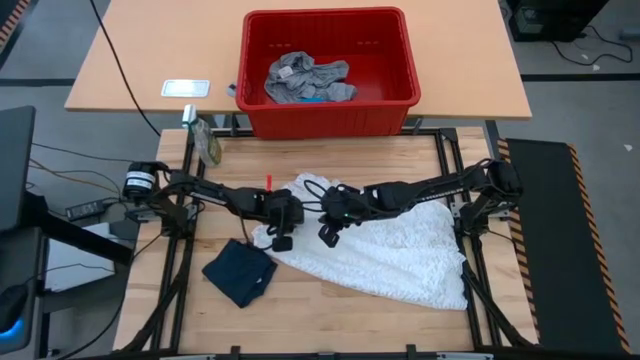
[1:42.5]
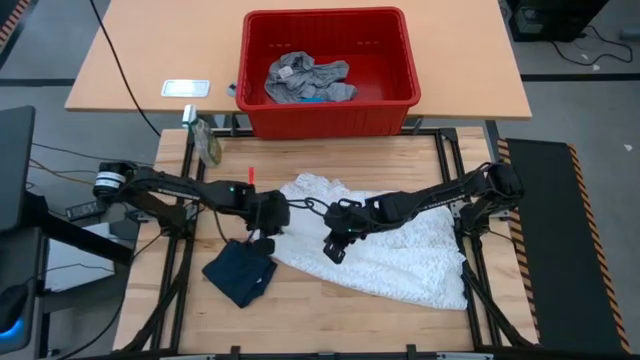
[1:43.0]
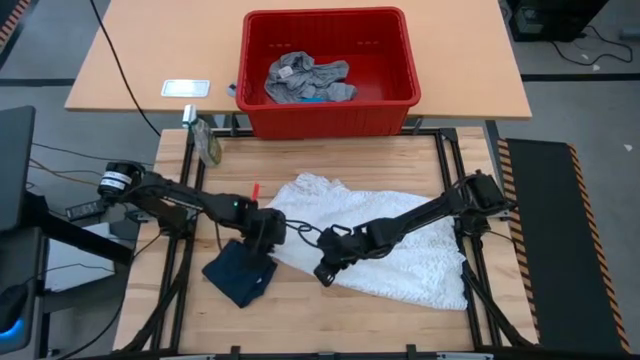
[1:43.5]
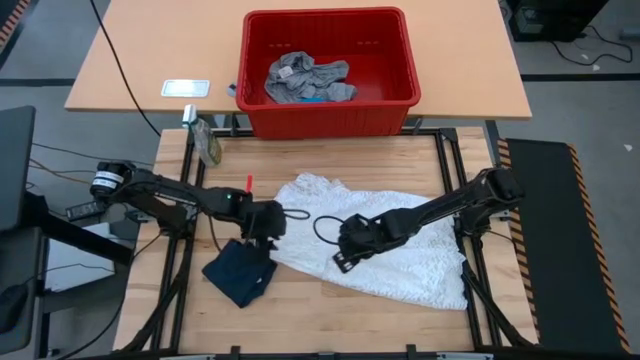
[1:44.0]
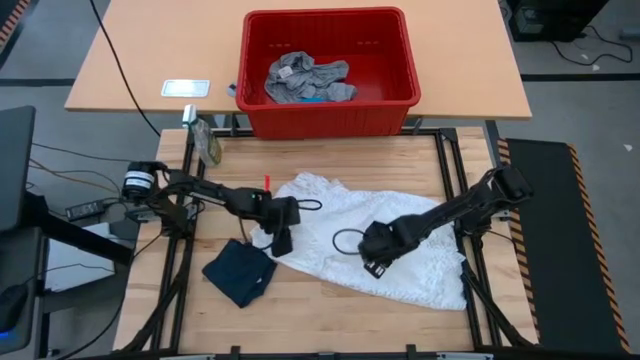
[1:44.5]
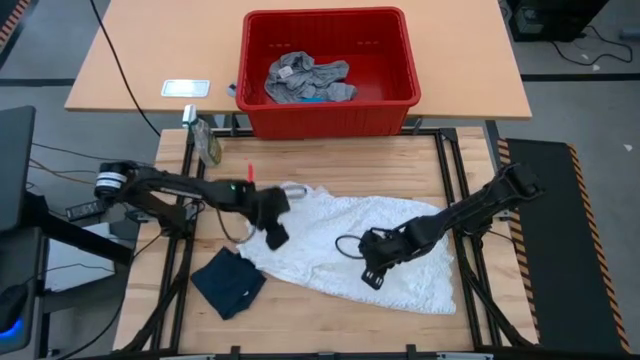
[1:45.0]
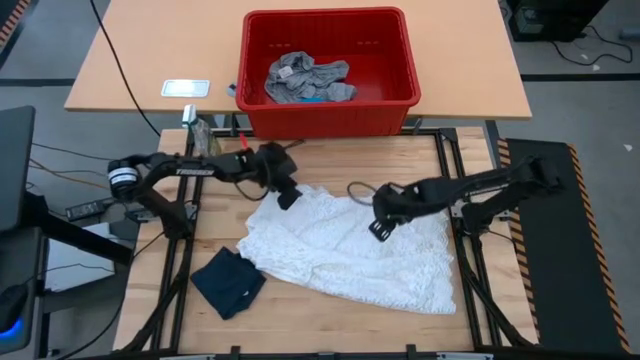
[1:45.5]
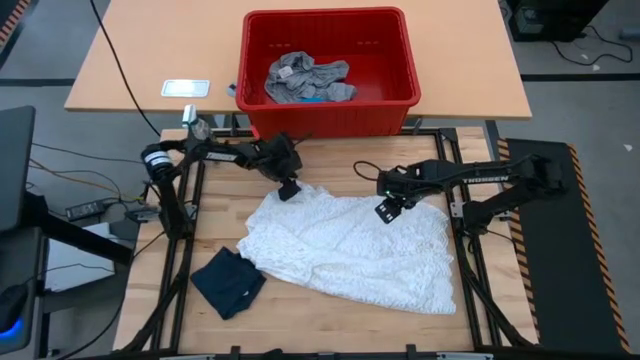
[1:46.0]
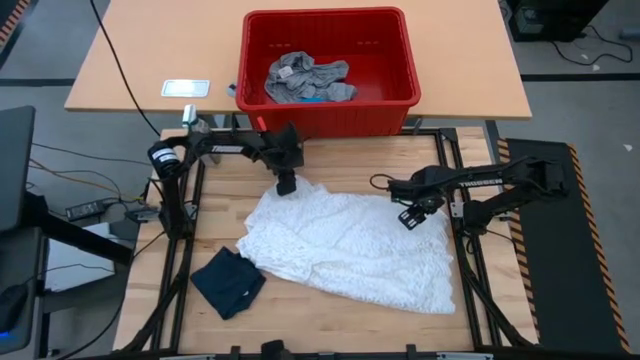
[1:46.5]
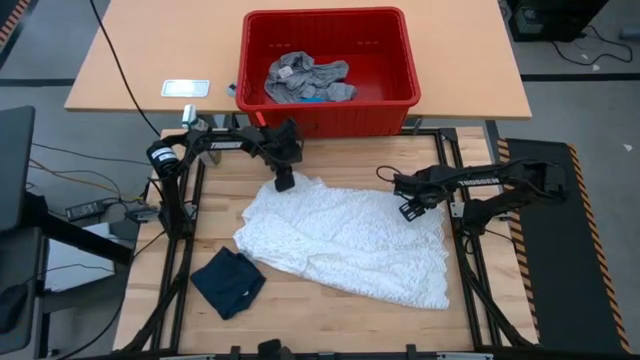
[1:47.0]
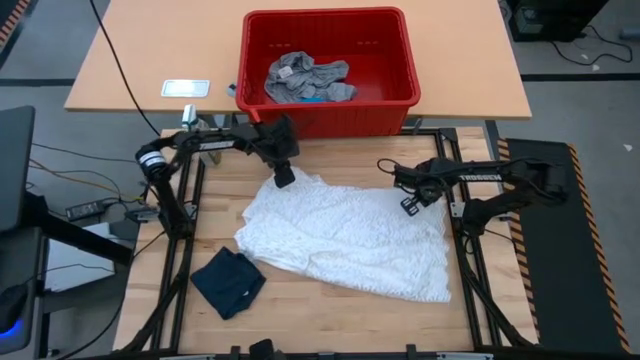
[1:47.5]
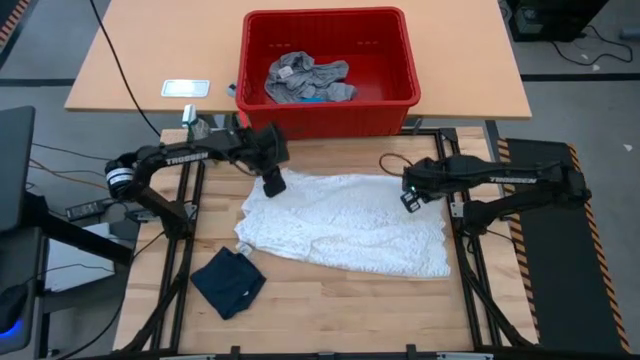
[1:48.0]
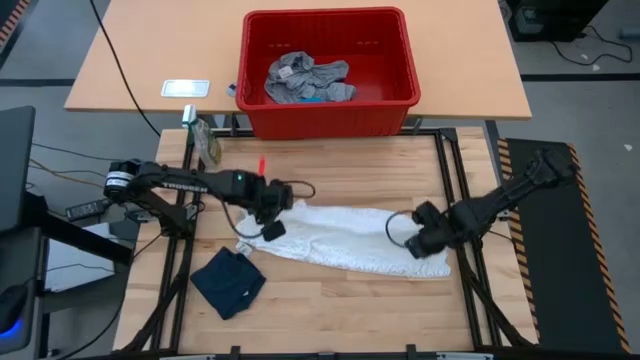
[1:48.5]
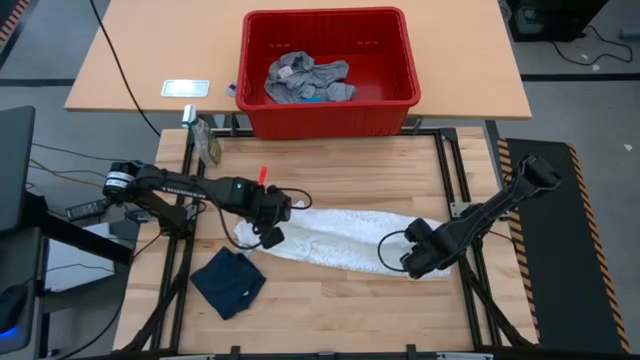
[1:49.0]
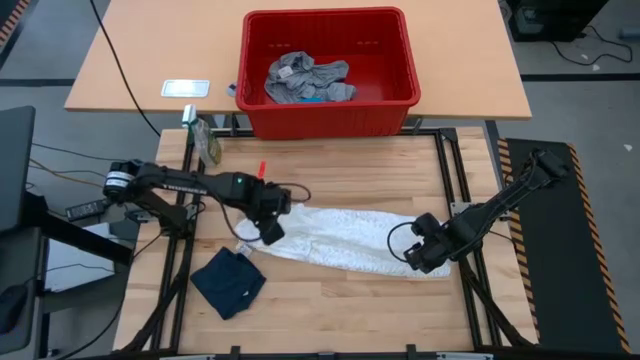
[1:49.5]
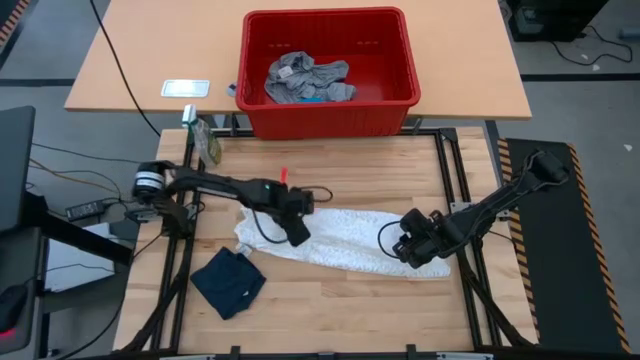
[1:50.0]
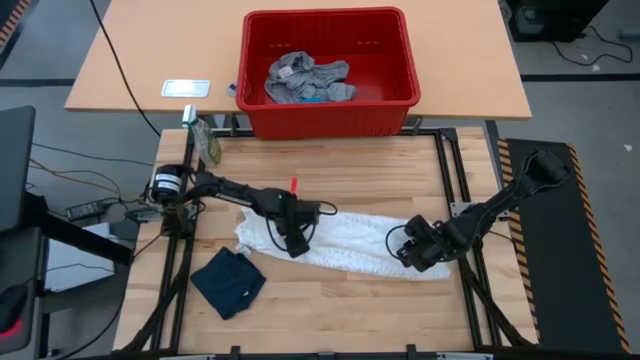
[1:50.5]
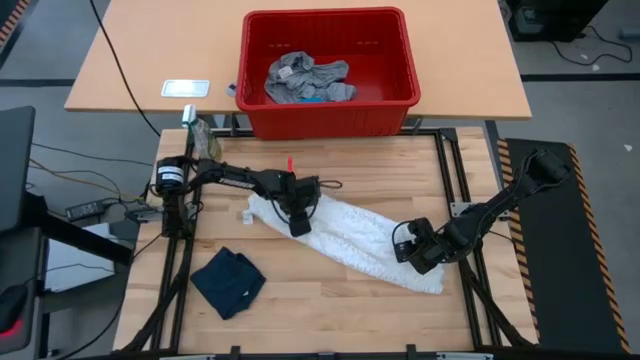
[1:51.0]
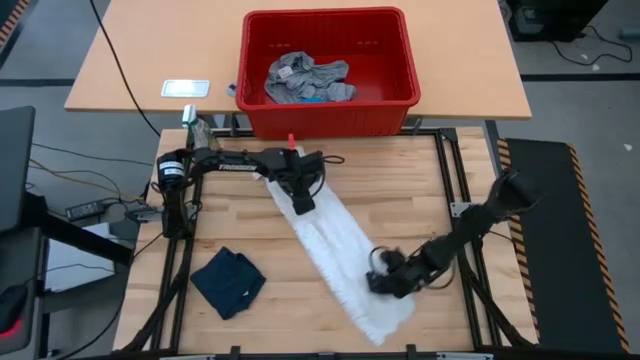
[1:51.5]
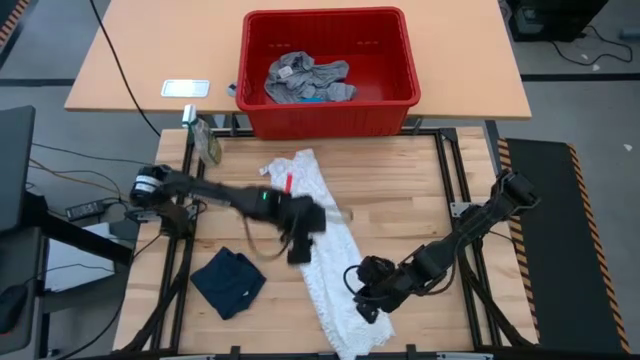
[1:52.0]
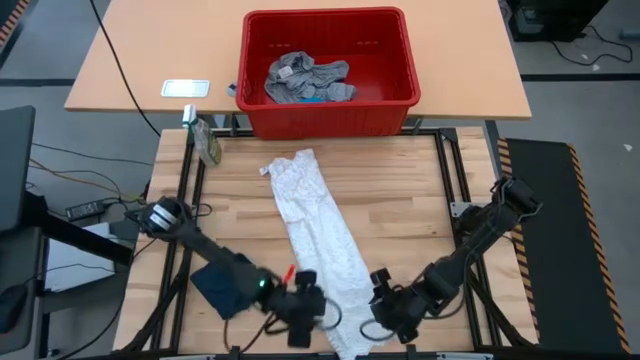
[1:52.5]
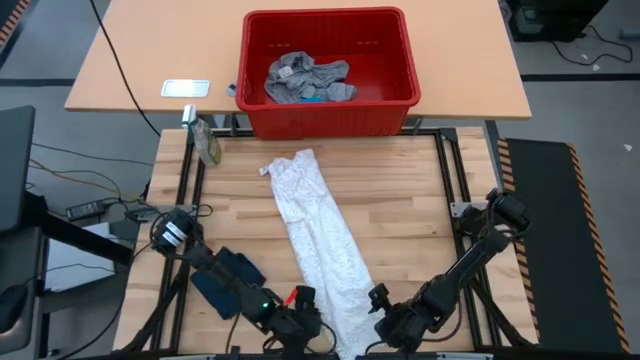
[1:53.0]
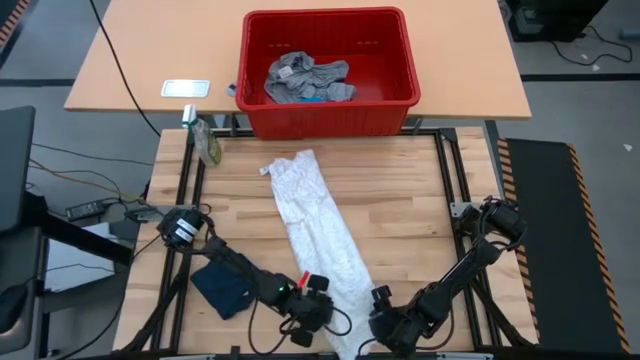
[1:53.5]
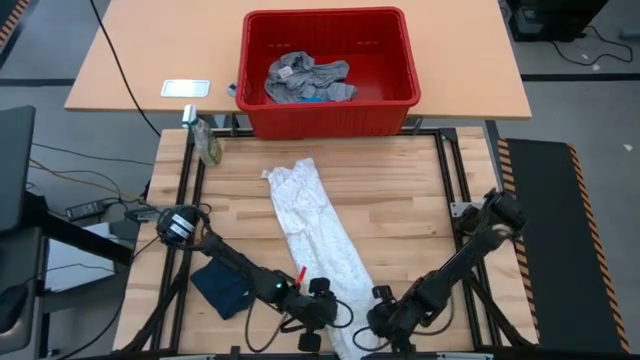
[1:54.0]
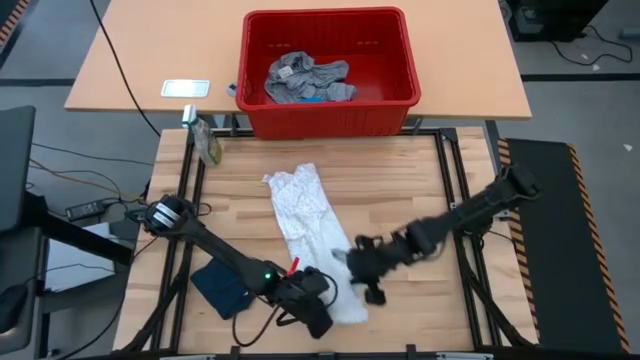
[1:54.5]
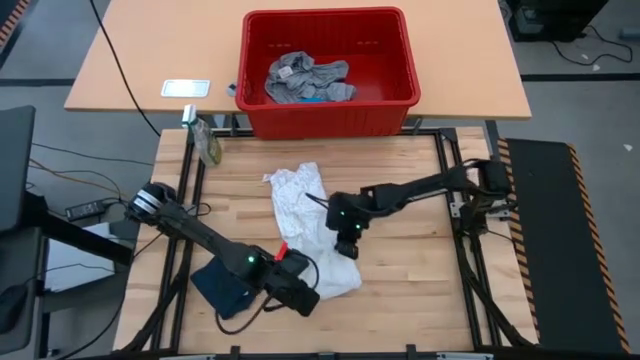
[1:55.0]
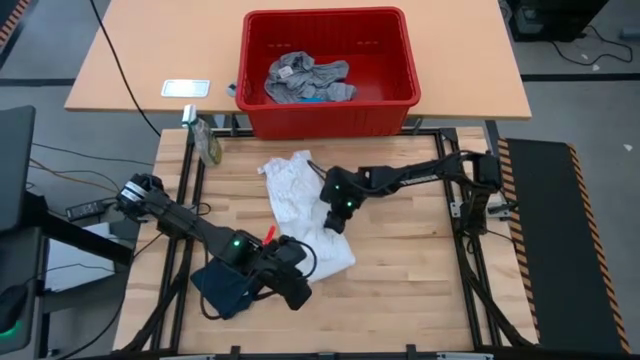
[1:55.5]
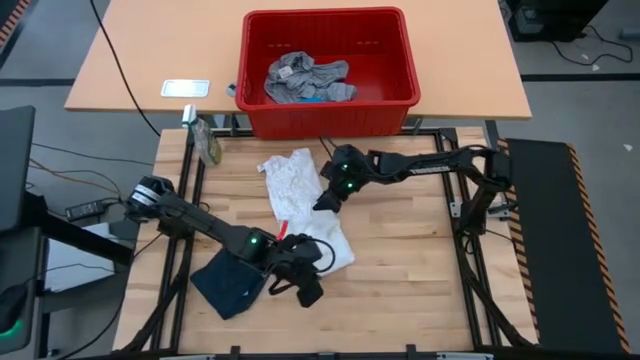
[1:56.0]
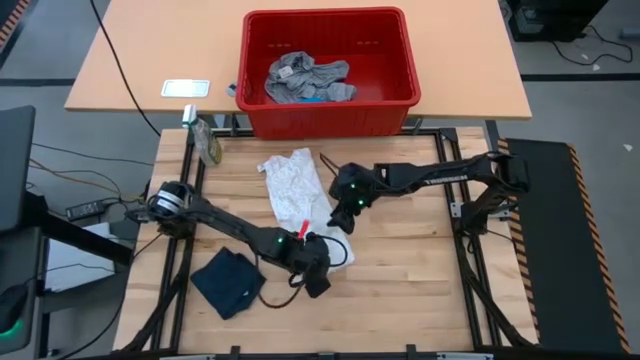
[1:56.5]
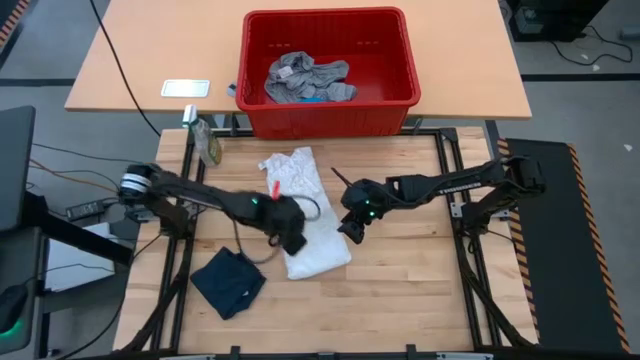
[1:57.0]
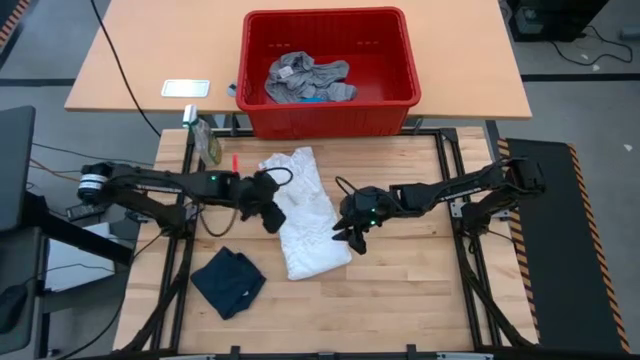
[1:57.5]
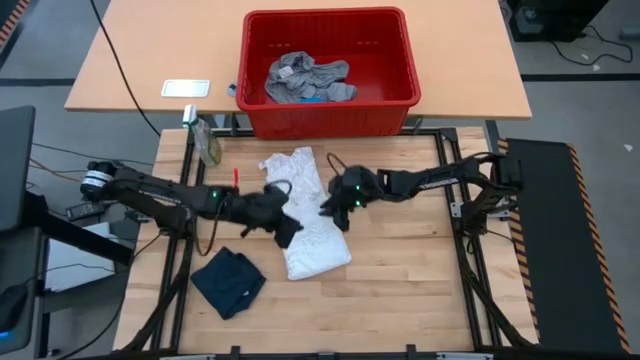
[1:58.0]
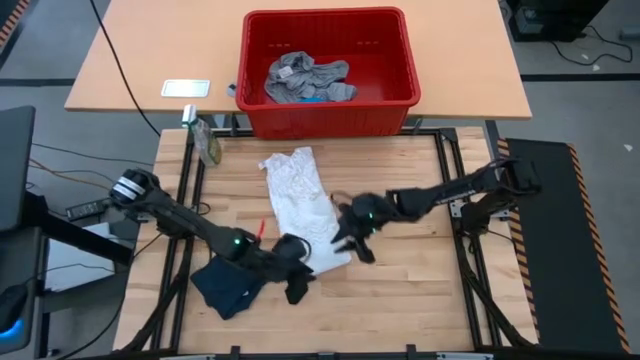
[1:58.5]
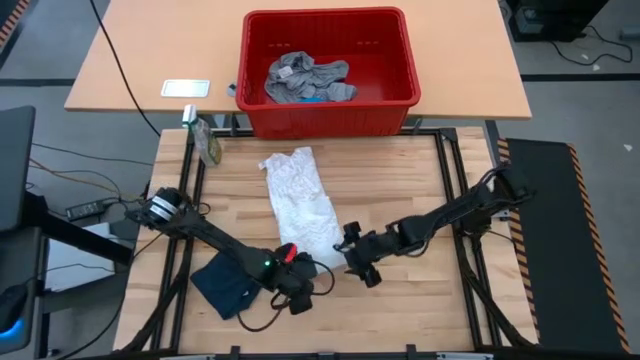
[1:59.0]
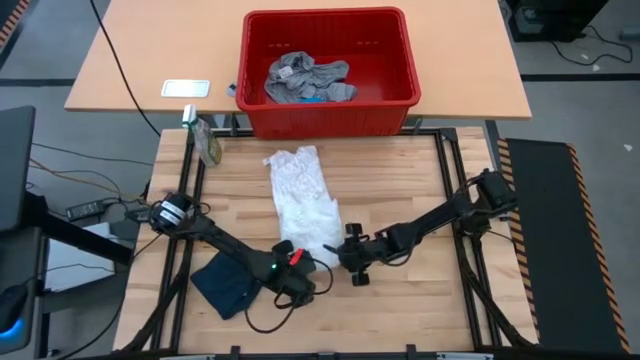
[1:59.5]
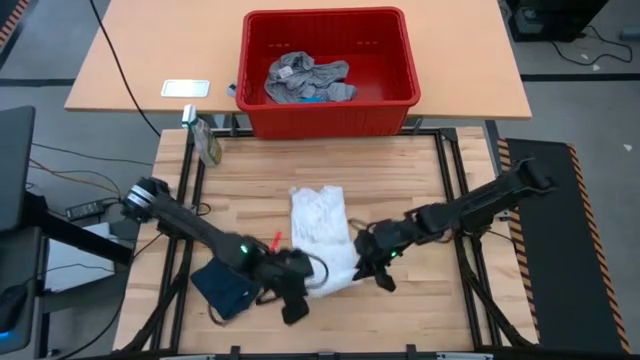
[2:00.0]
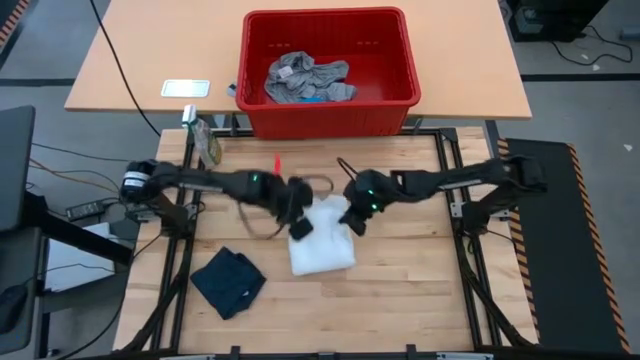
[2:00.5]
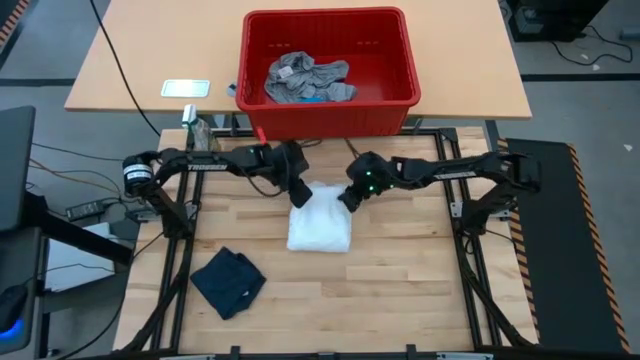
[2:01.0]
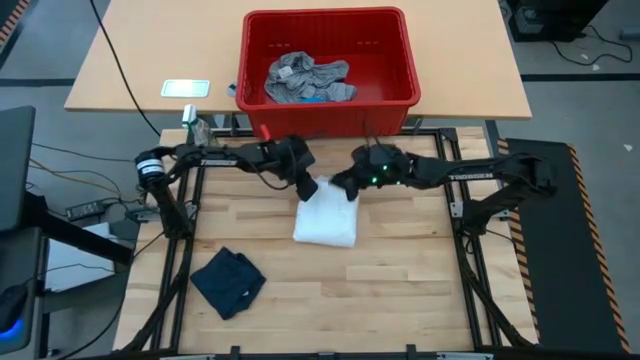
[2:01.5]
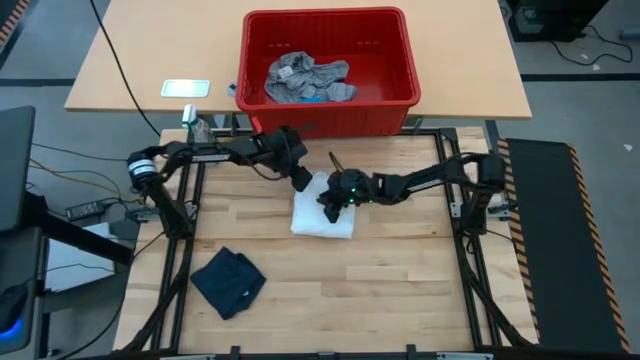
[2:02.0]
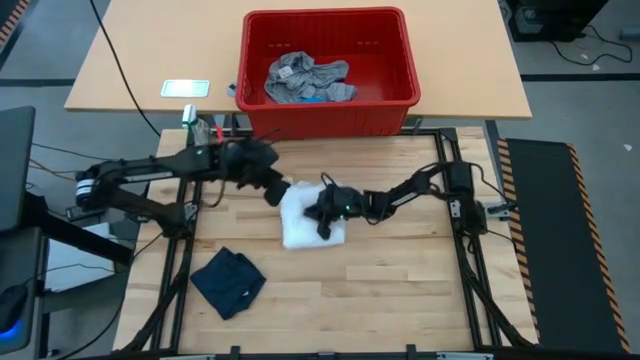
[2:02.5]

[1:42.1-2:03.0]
Task: Fold laundry
Fold the white dress

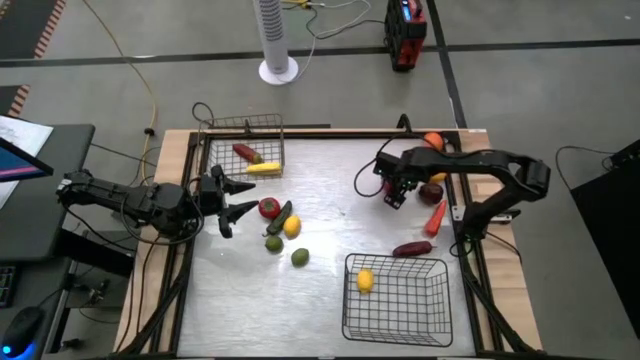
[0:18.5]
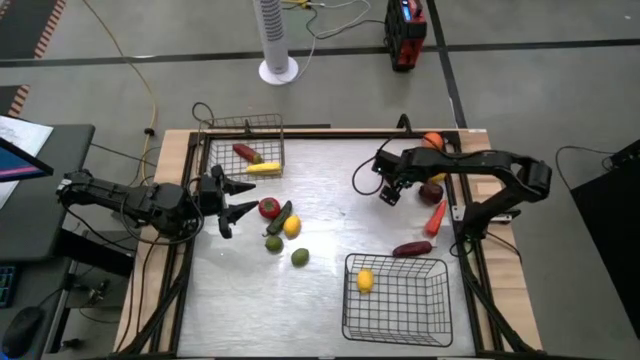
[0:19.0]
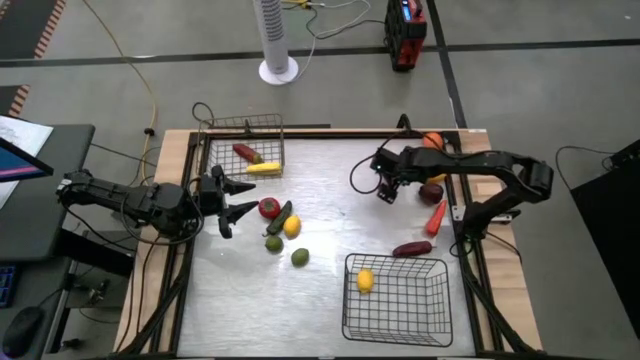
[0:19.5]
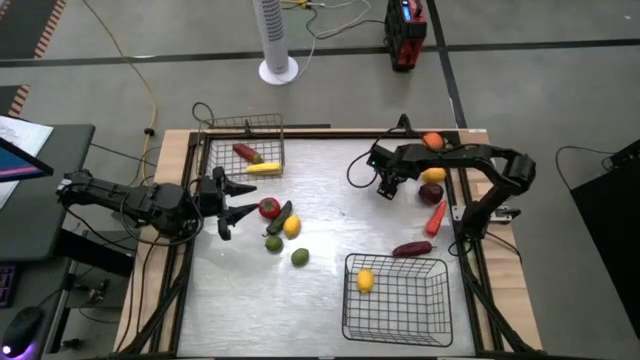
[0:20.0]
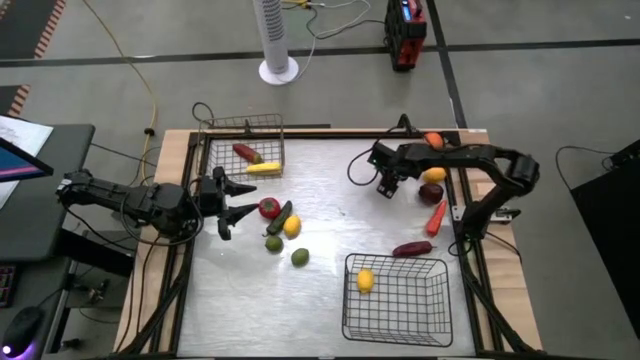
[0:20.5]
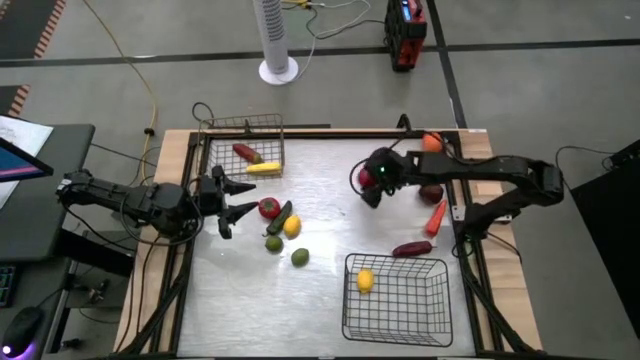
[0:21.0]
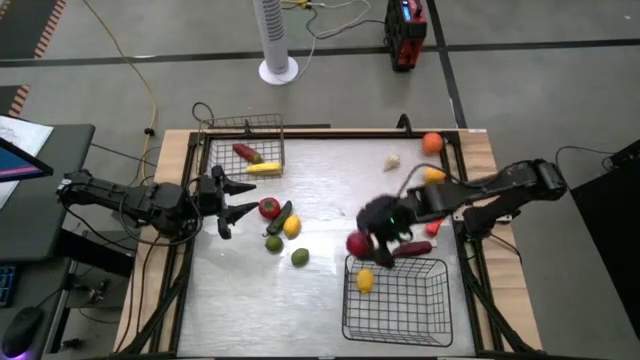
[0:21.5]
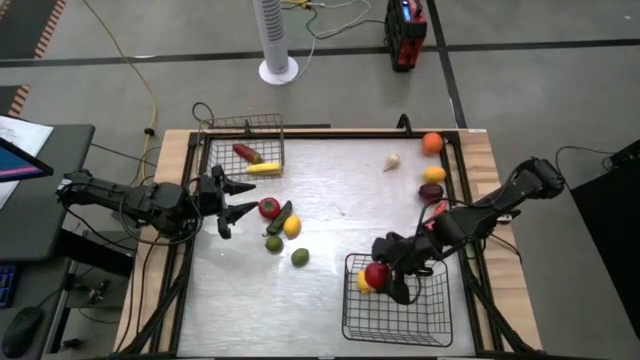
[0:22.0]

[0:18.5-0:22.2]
Task: Sort produce into baskets
Put the right tomato into the bottom wire basket
